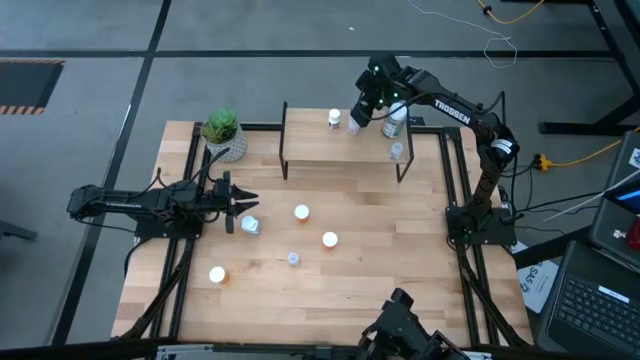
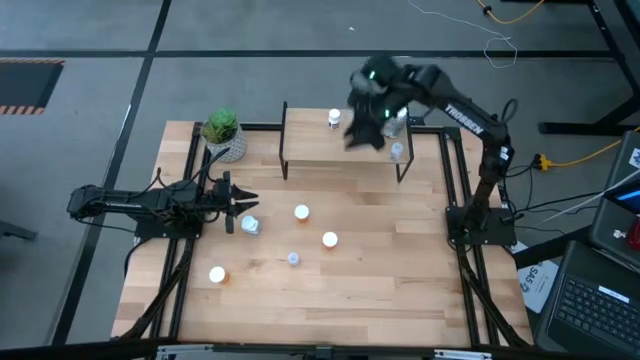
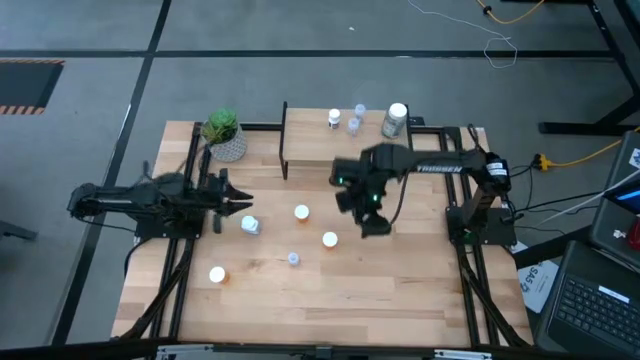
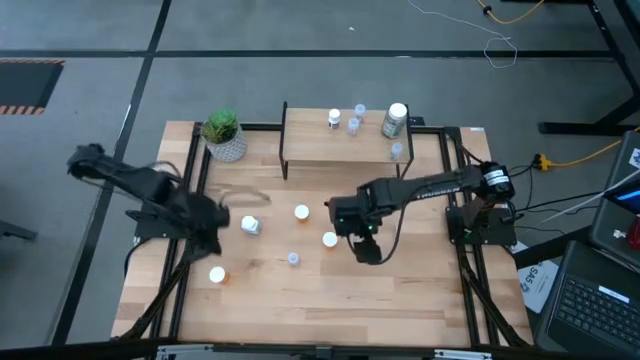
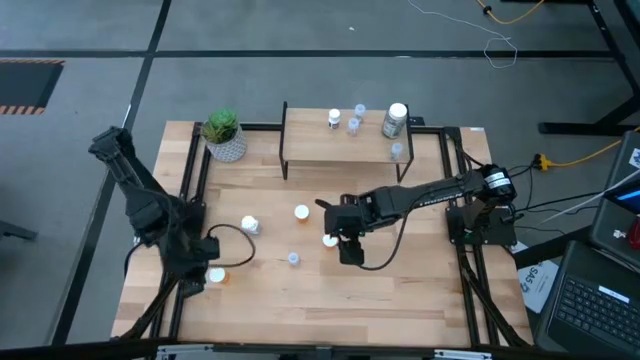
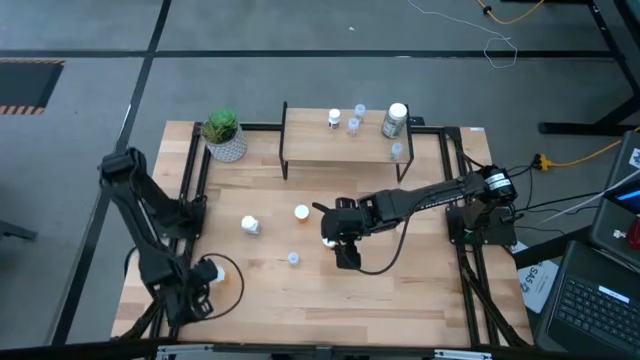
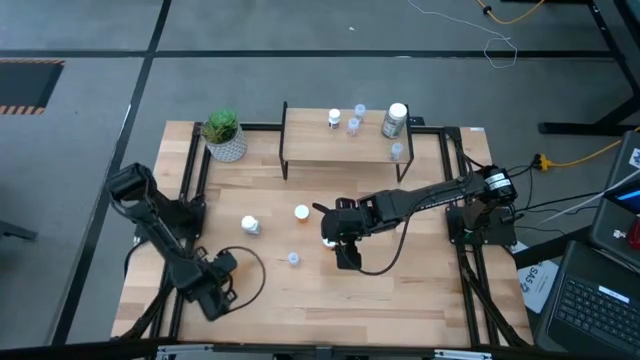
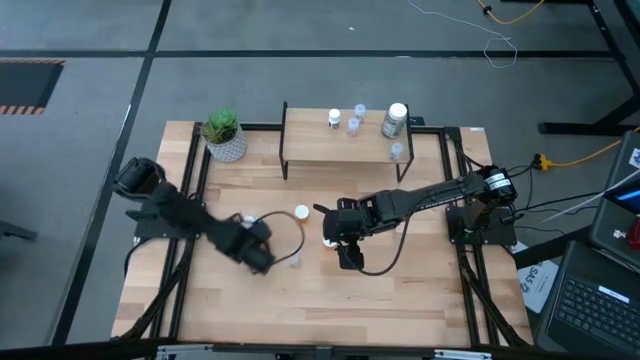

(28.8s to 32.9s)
Task: Pick and place medicine bottles onto shelf by color
Move the orange pill bottle to the center

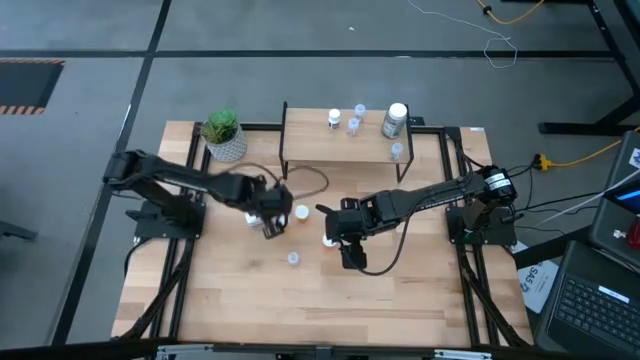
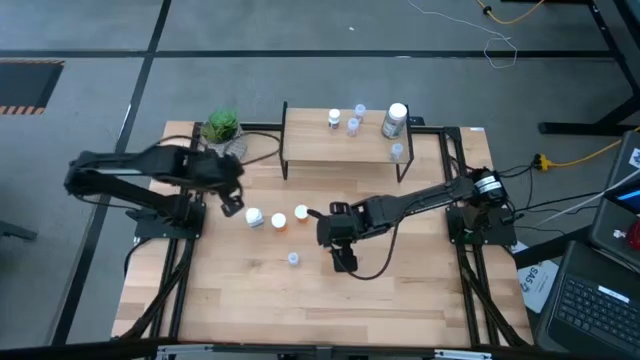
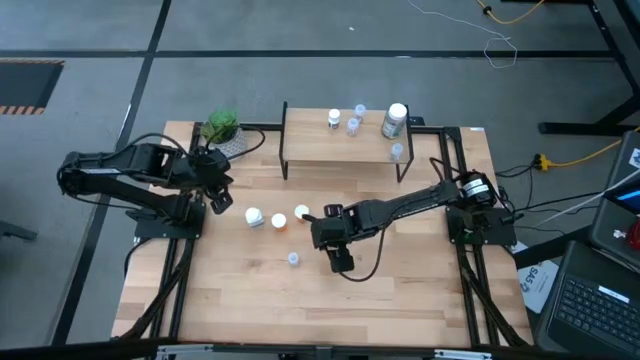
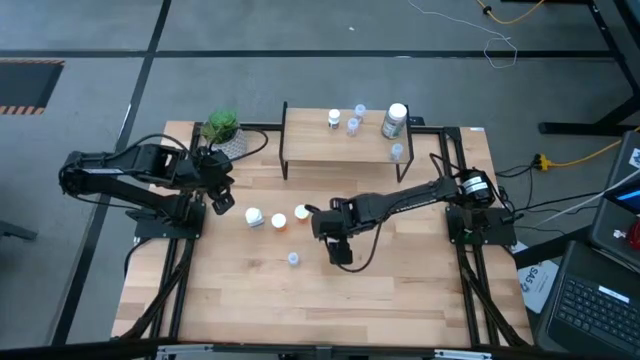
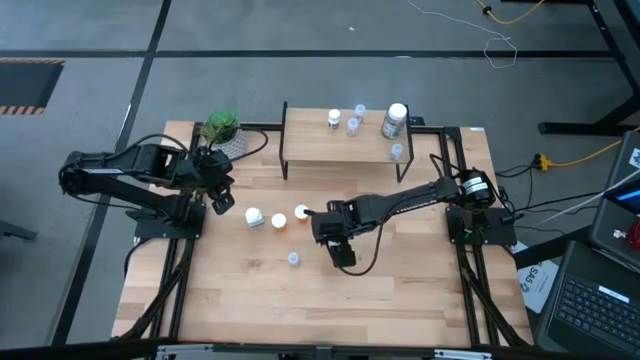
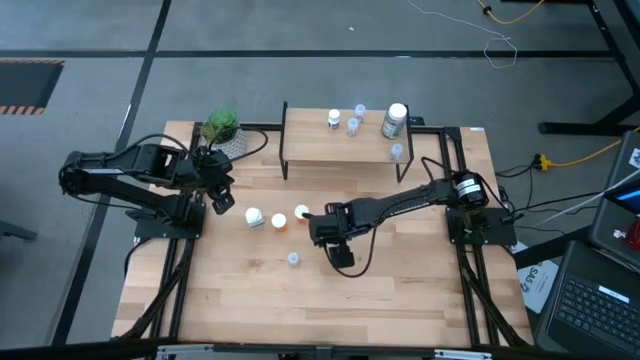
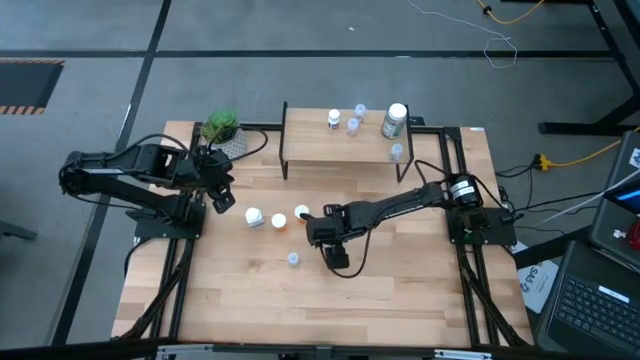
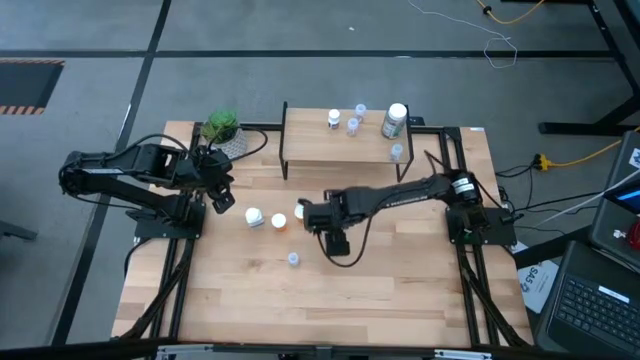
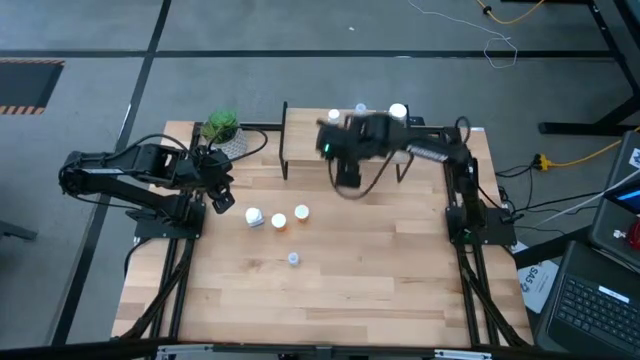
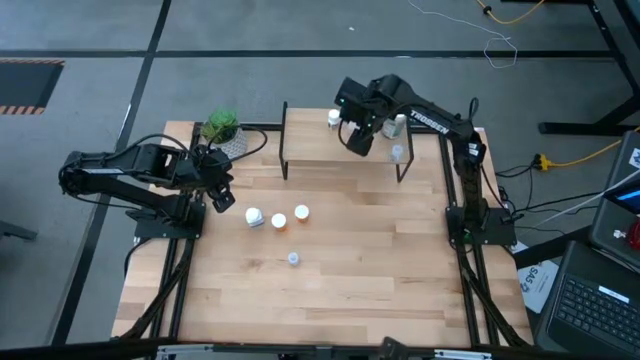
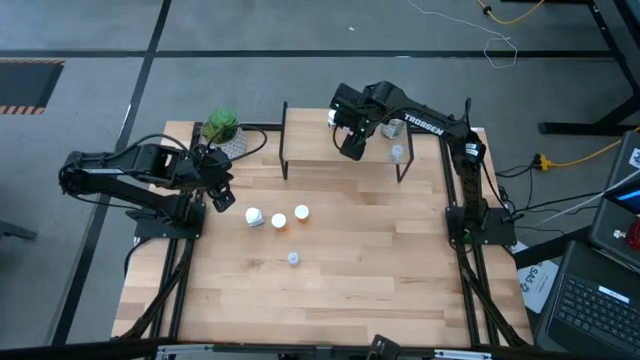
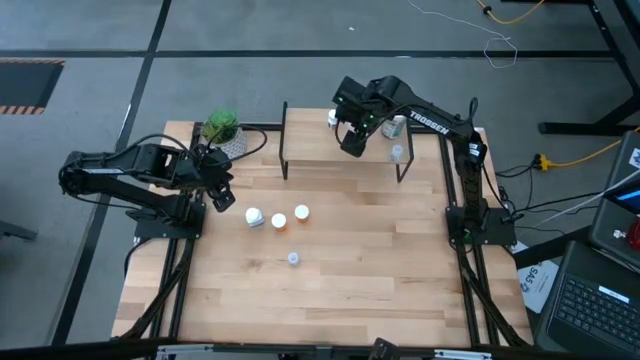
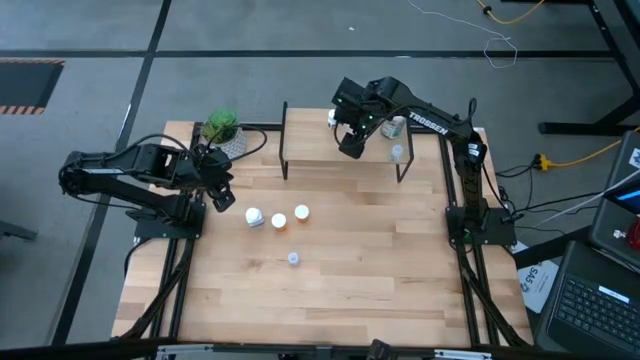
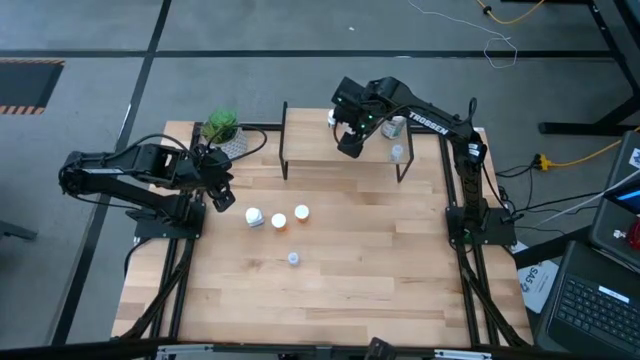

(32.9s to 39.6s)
Put the orange pill bottle on the shelf

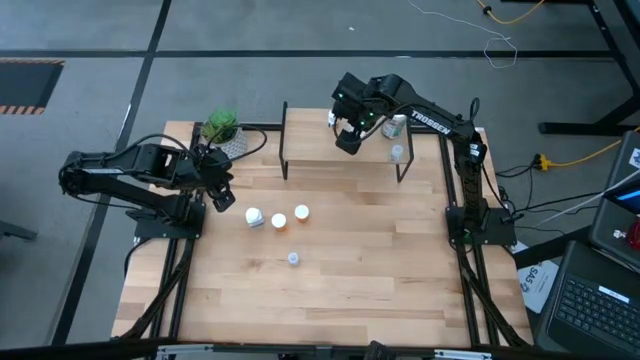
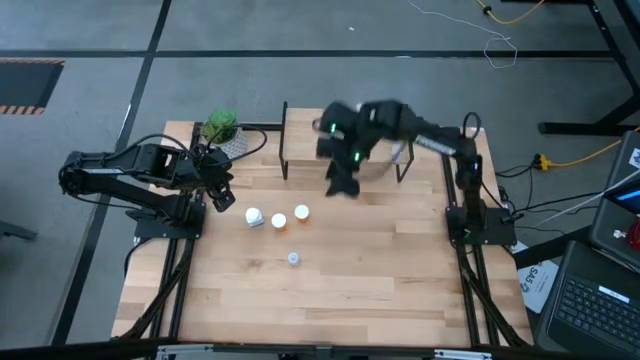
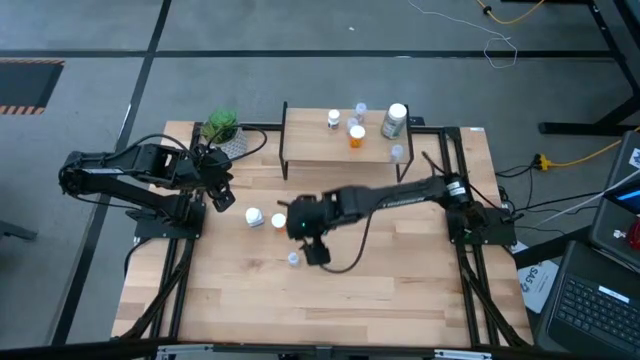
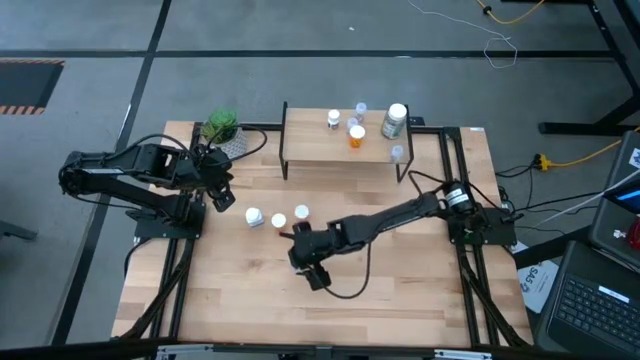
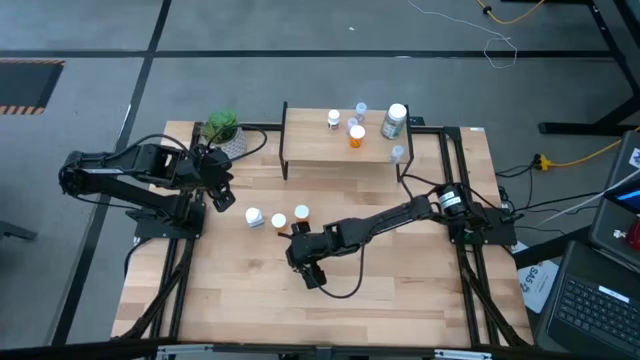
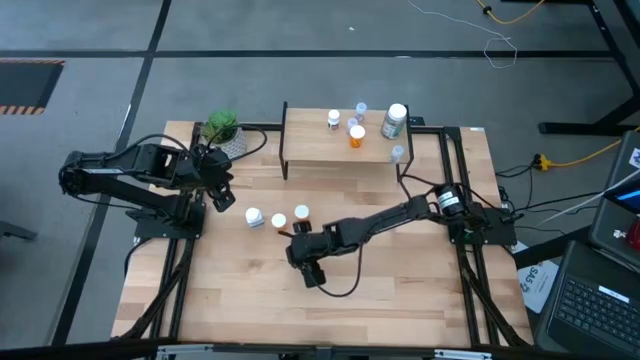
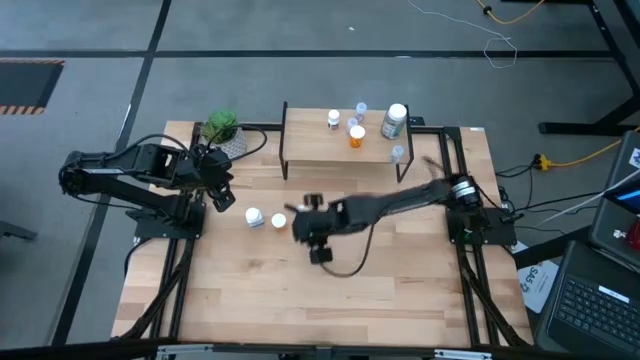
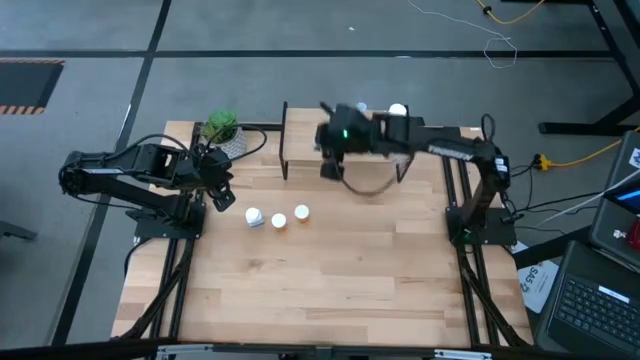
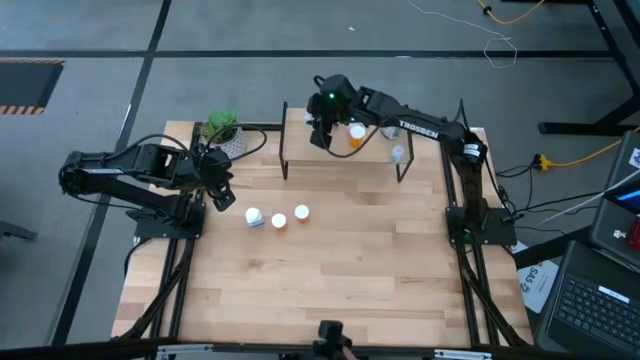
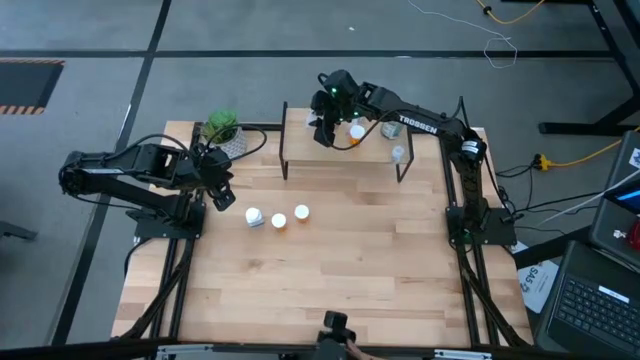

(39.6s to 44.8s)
Put the transparent pill bottle on the shelf

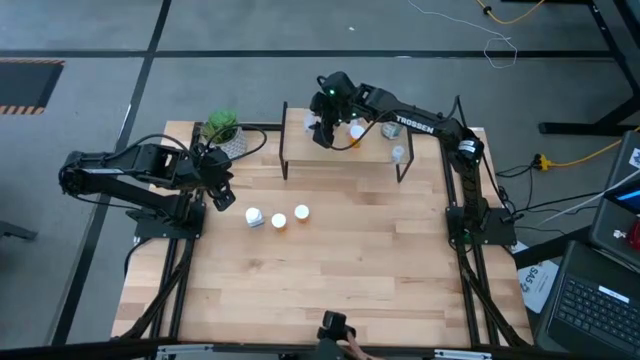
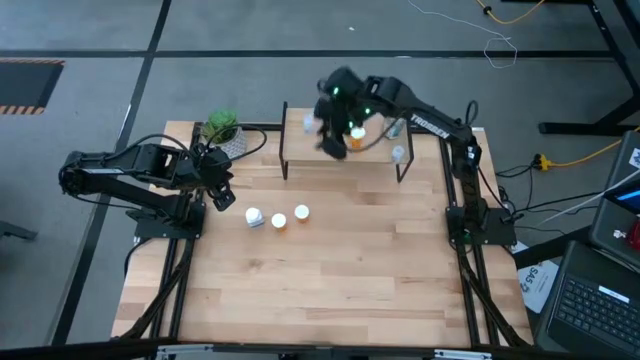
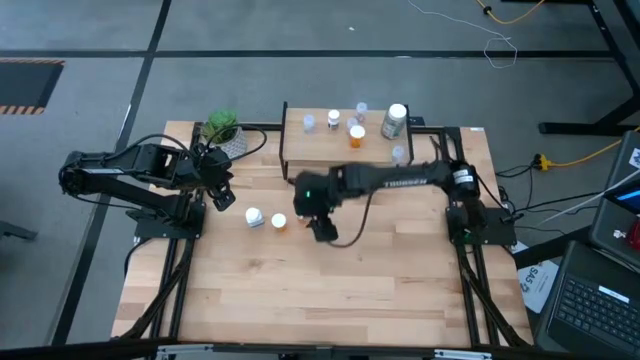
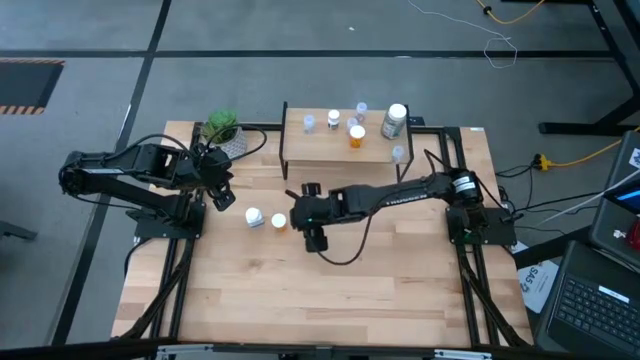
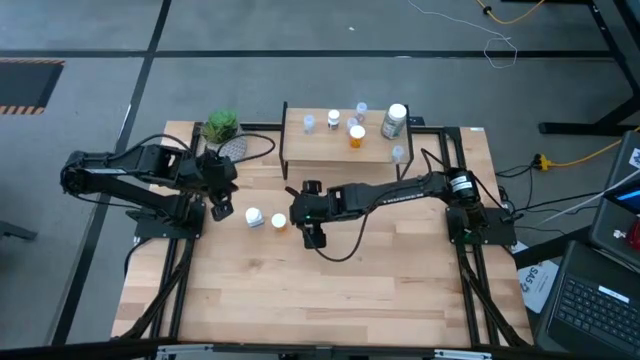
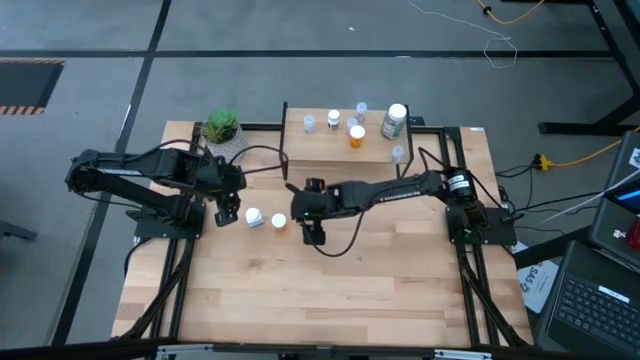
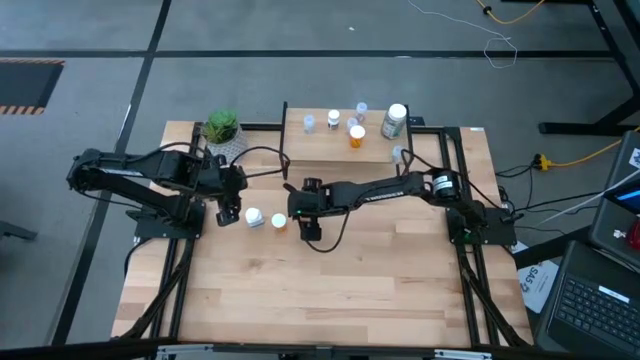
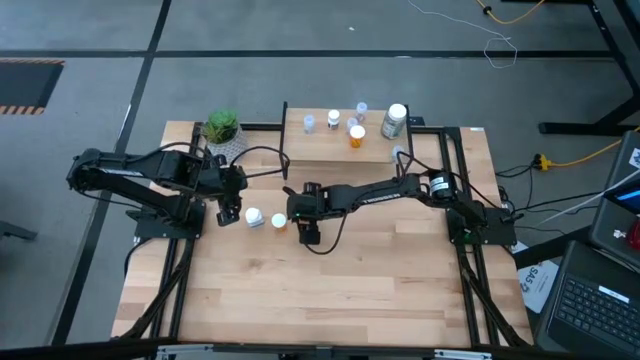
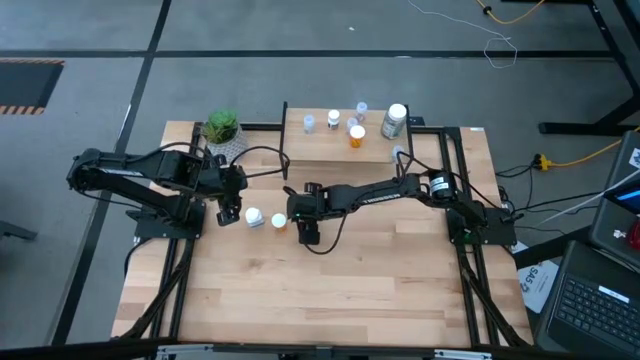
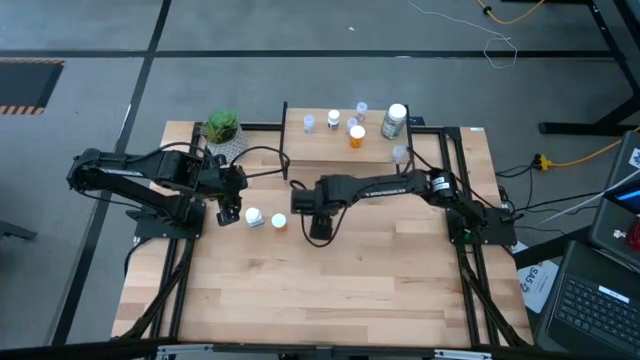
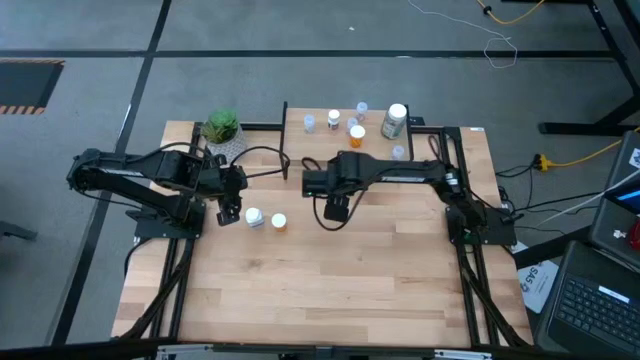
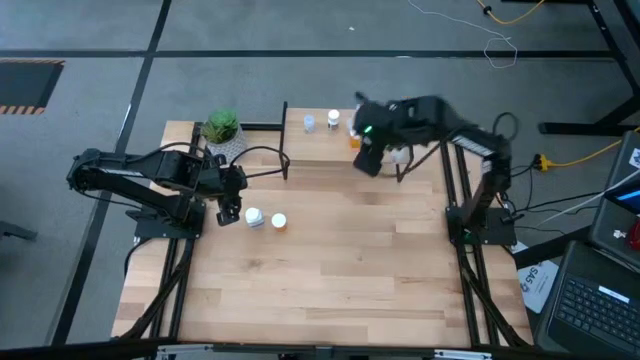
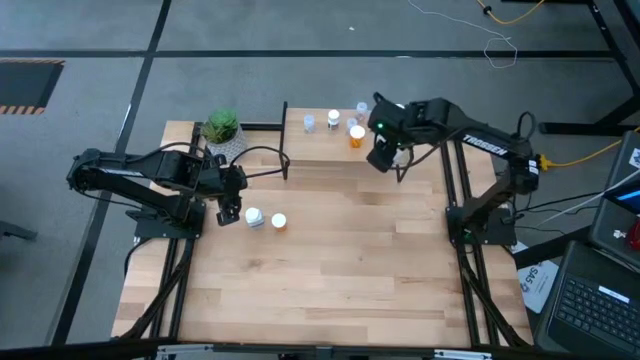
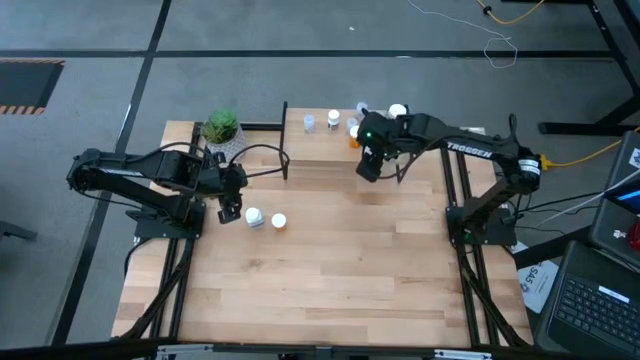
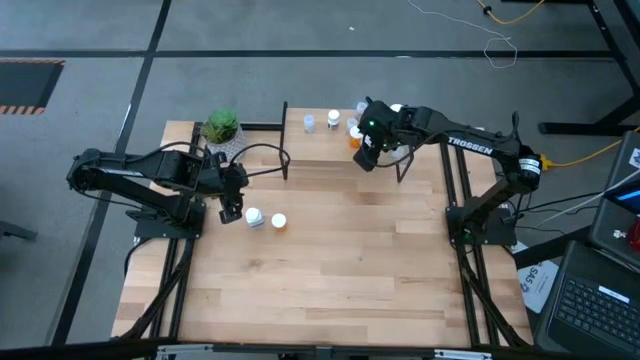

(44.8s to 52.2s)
Put the orange pill bottle on the shelf
